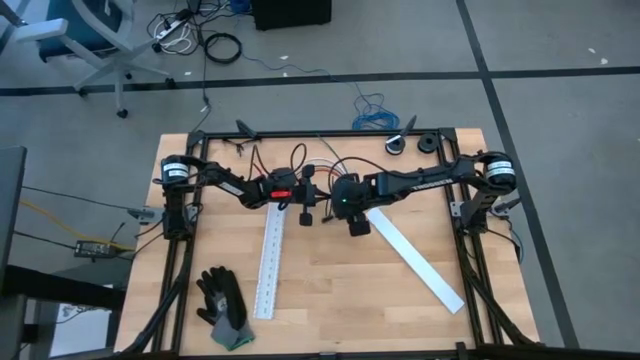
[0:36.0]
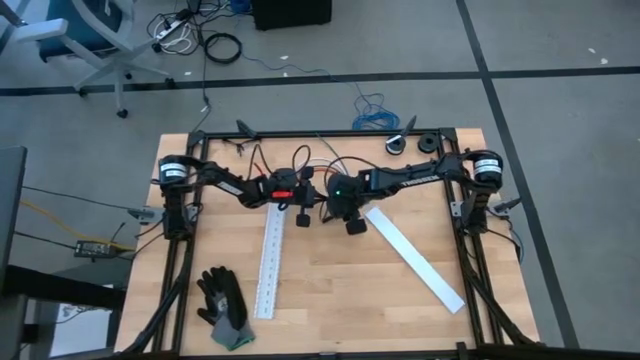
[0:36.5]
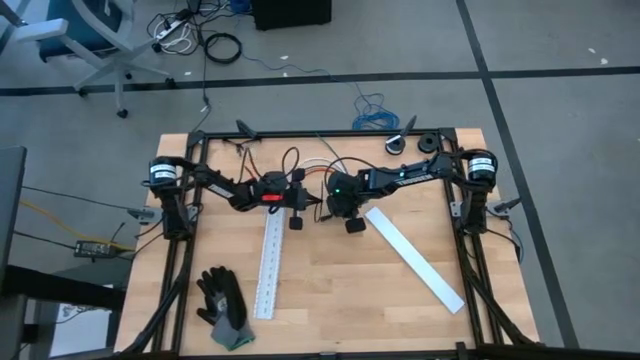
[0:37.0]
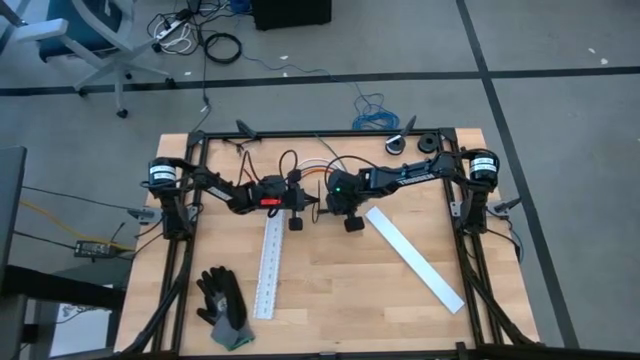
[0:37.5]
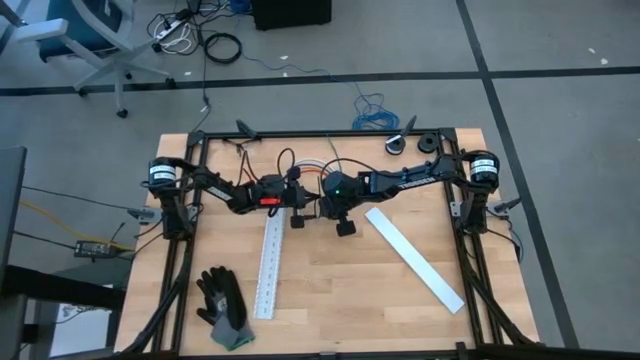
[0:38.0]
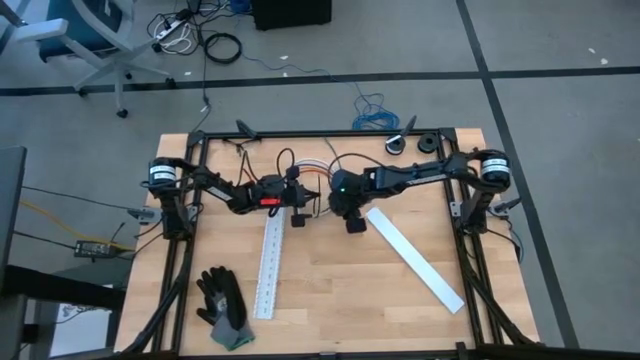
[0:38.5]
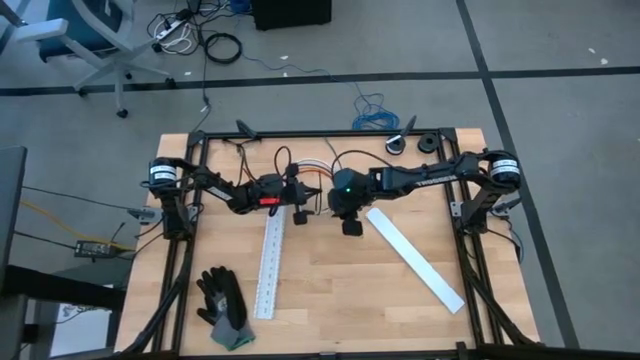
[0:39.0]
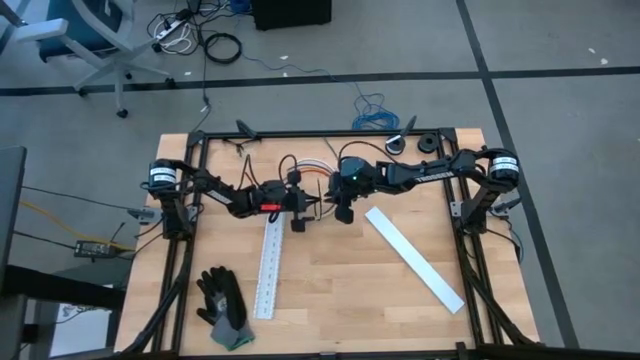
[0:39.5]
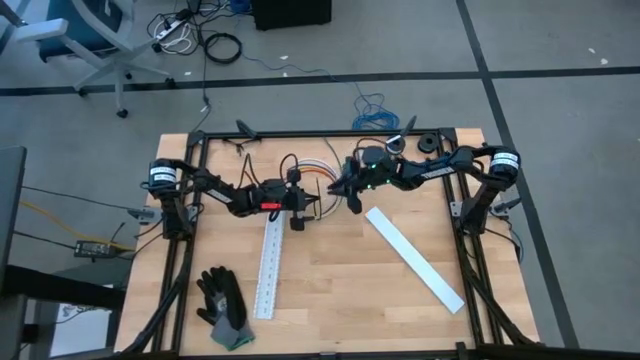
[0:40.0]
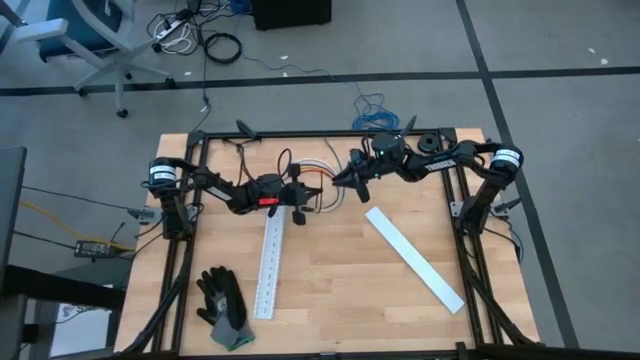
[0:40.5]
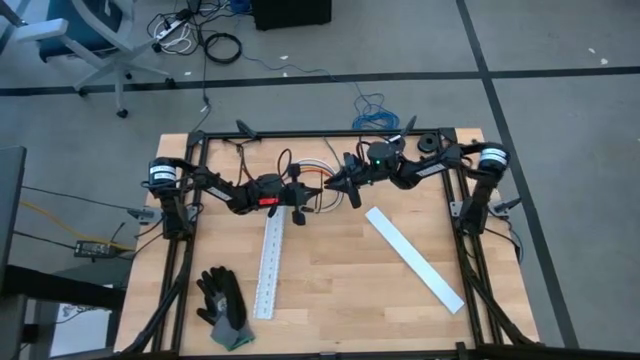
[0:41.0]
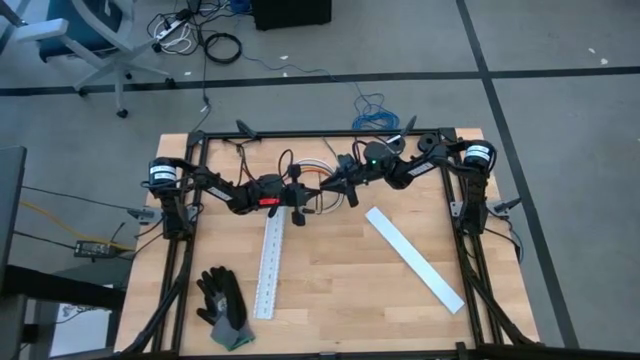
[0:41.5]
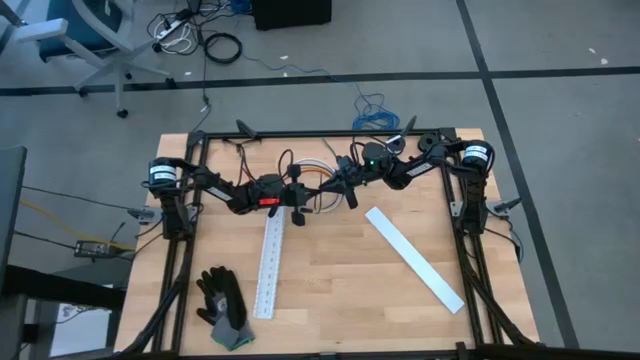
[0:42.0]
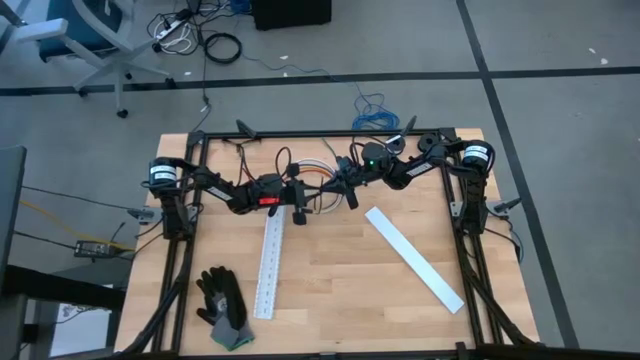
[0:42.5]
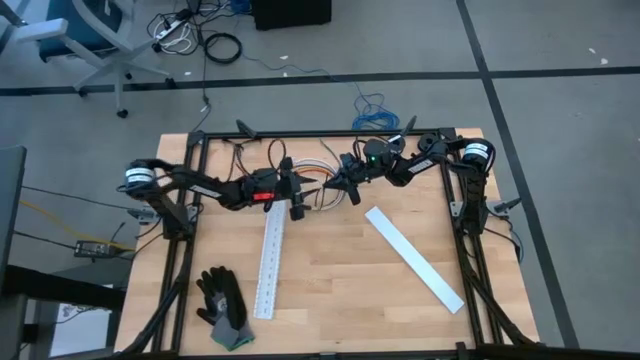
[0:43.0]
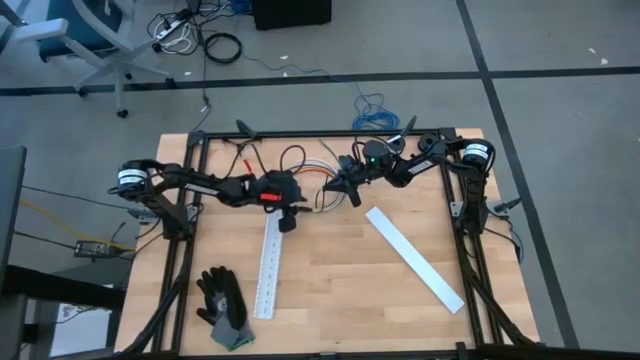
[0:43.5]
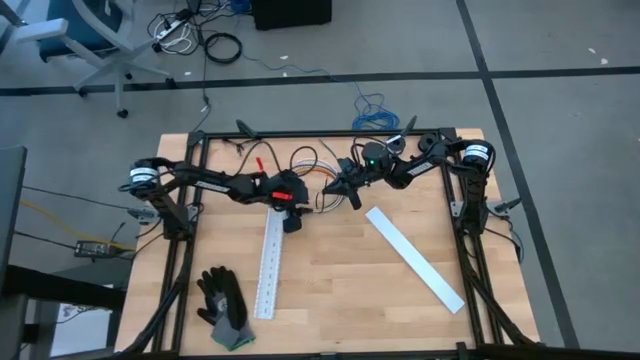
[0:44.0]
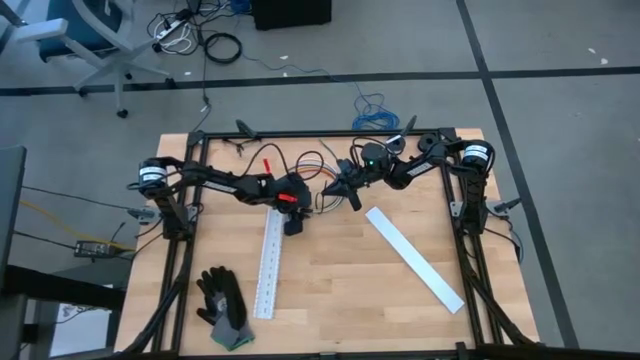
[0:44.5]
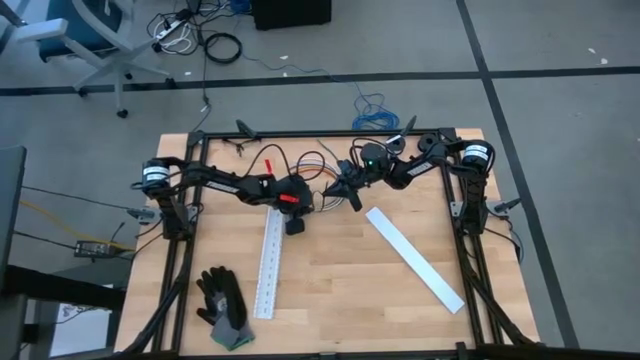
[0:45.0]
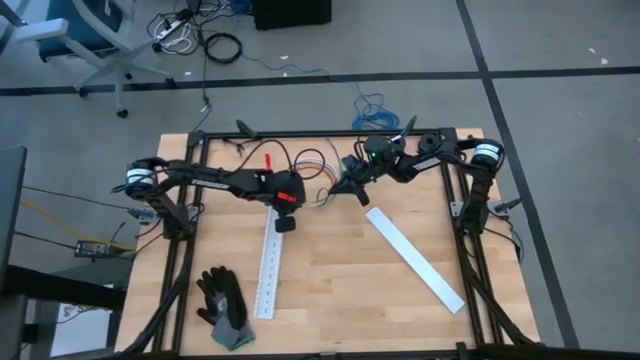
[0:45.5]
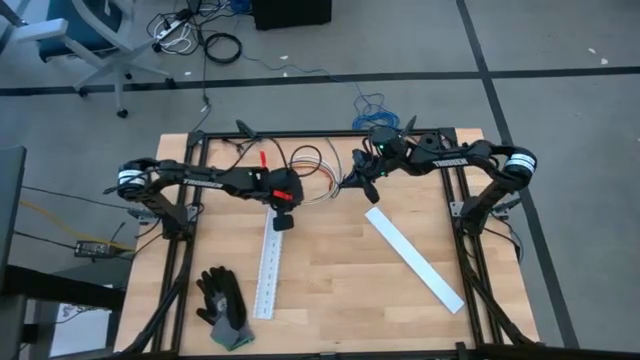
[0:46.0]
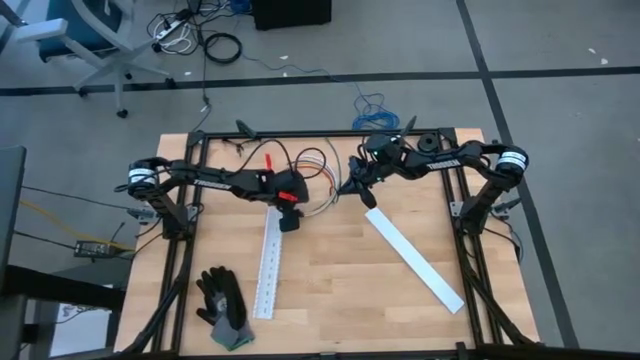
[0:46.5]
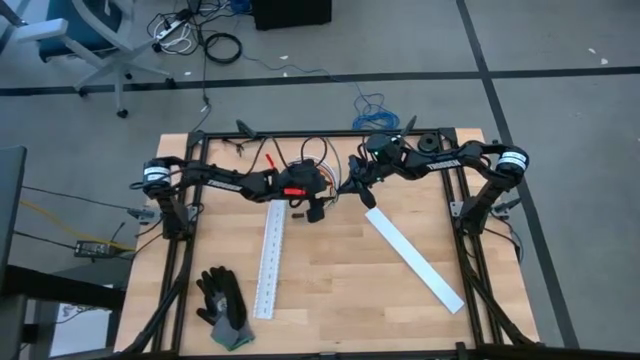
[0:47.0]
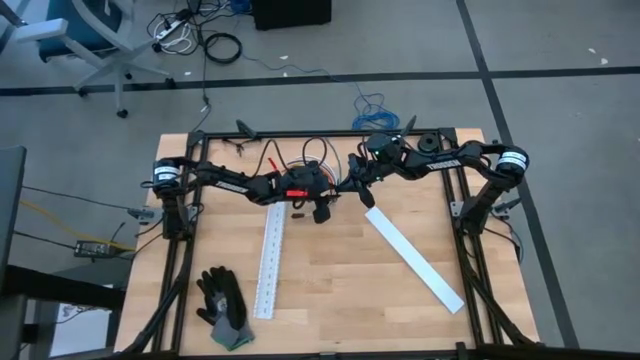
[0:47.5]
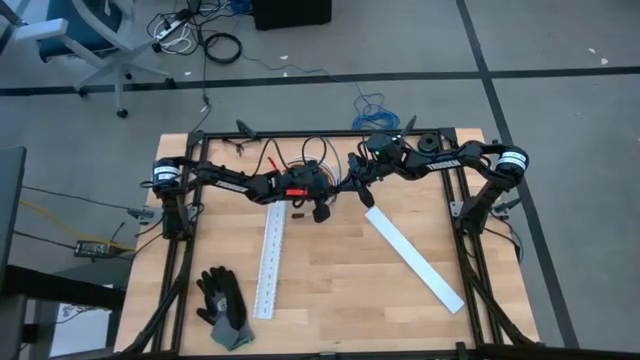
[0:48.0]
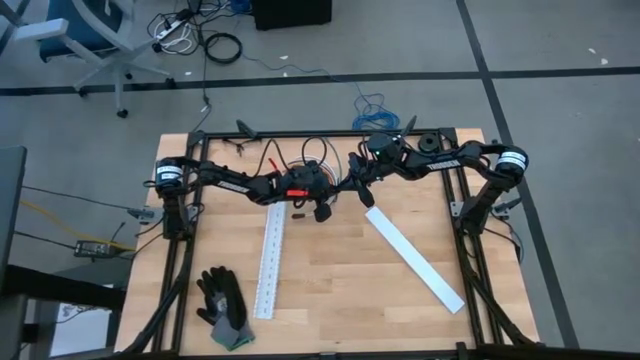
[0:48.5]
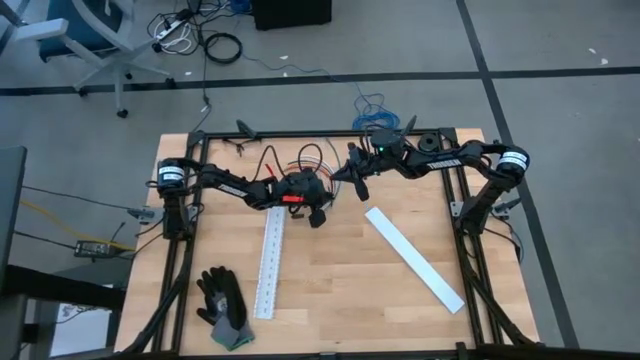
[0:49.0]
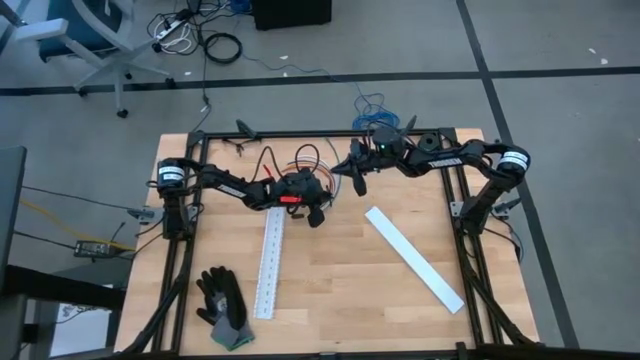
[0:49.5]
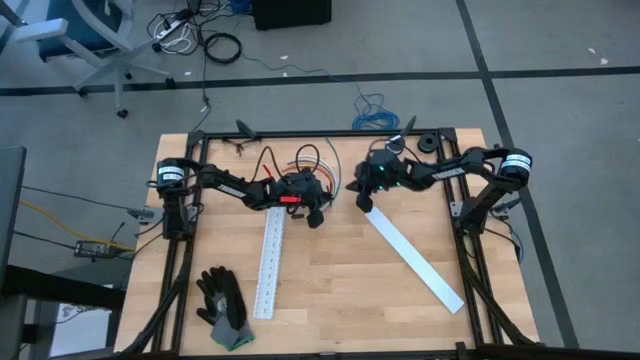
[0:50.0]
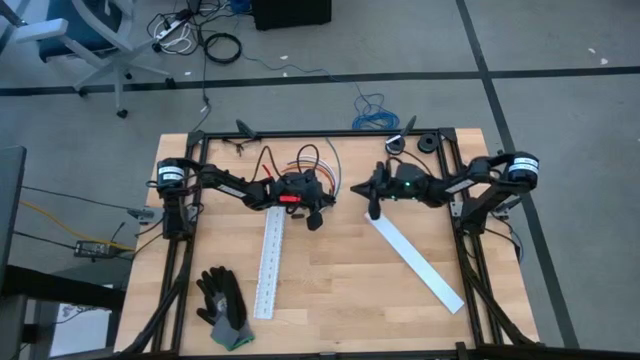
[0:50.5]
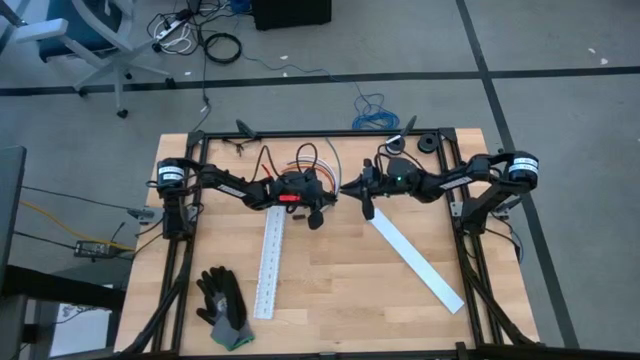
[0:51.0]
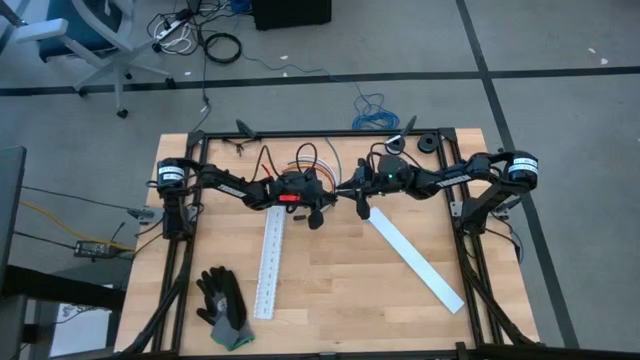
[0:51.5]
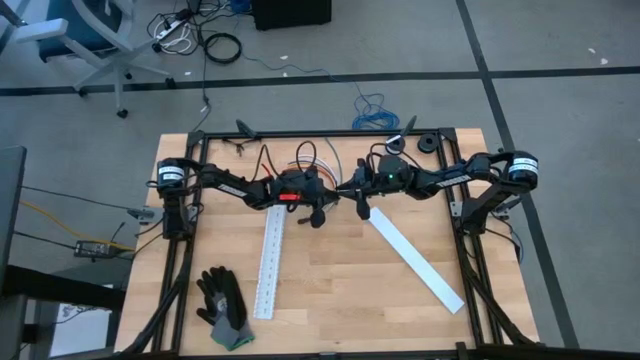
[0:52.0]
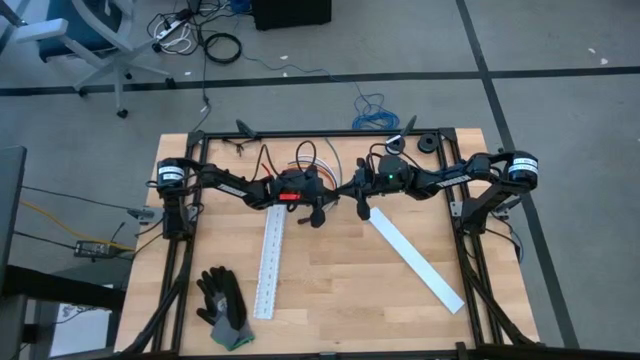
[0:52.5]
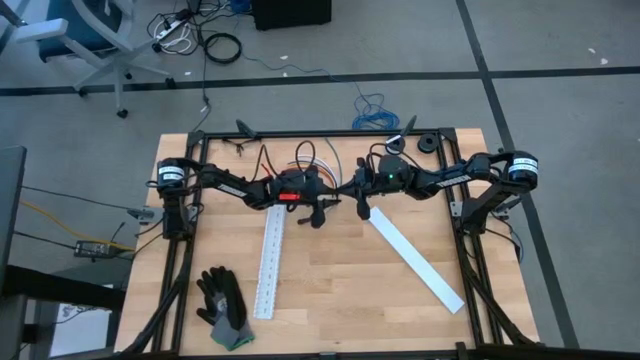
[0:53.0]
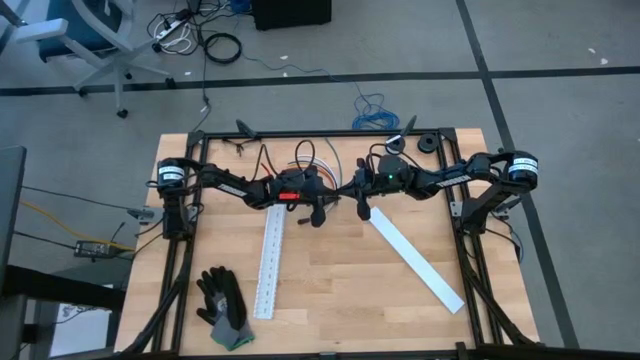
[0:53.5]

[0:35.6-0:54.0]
Task: Ziptie cables
Wrap the cable wires with the black zip tie

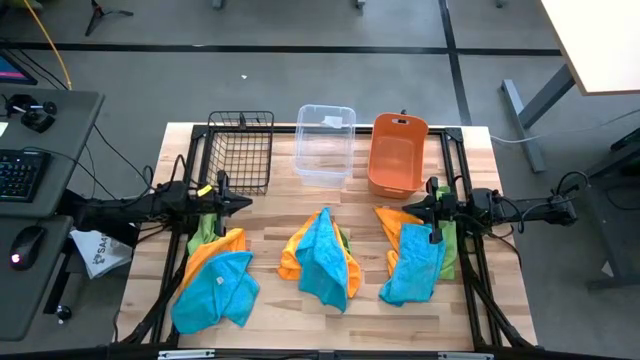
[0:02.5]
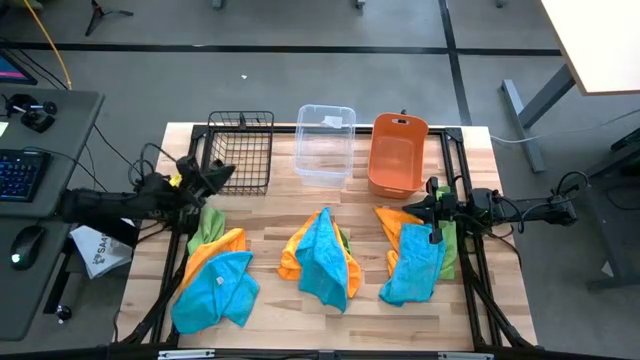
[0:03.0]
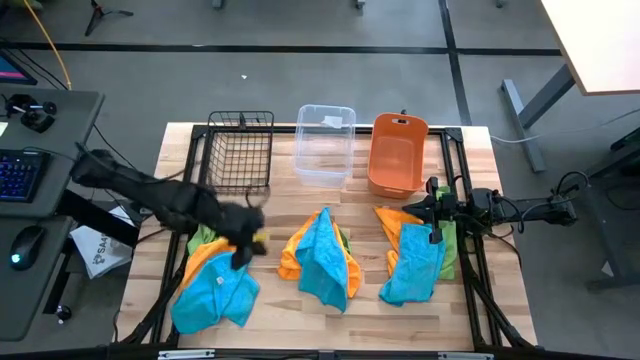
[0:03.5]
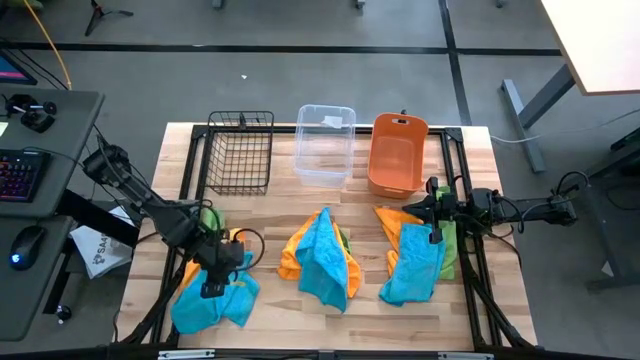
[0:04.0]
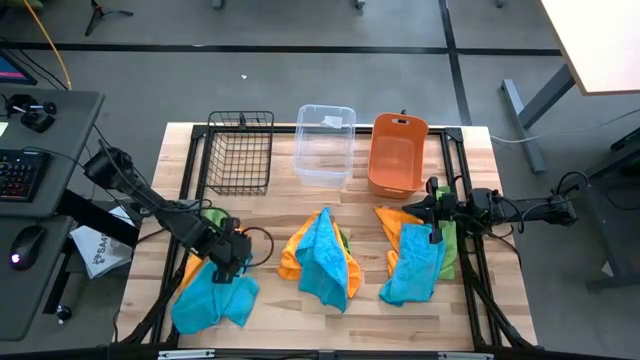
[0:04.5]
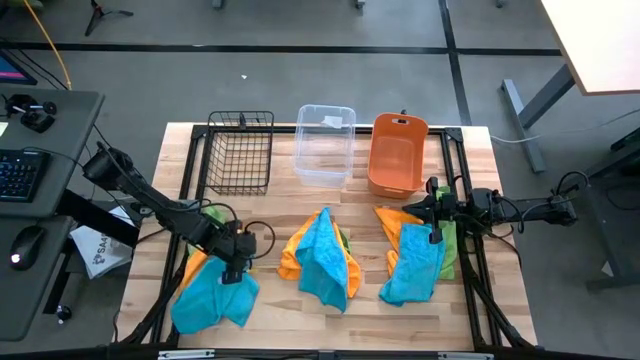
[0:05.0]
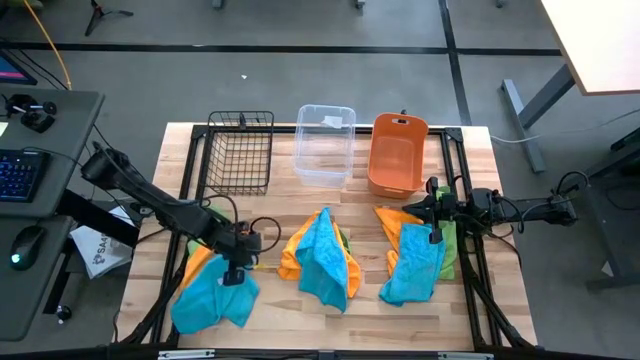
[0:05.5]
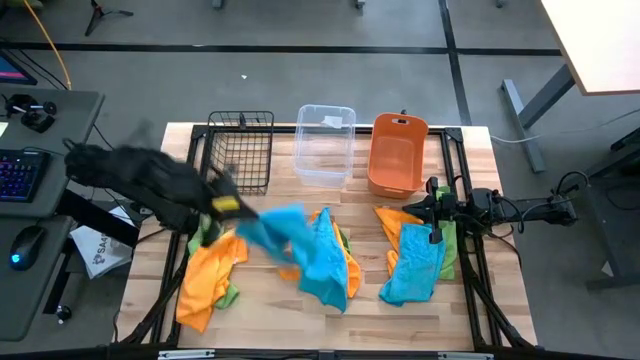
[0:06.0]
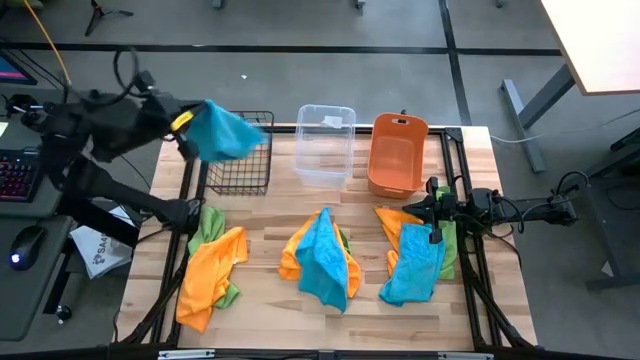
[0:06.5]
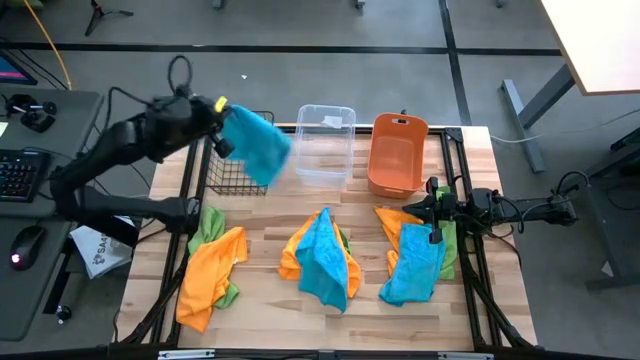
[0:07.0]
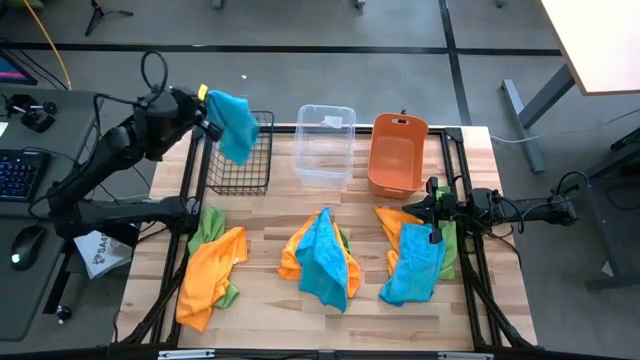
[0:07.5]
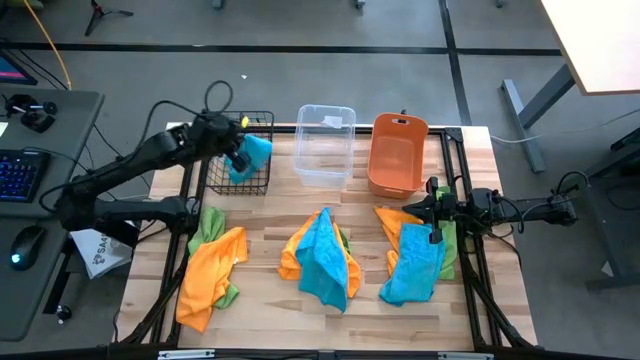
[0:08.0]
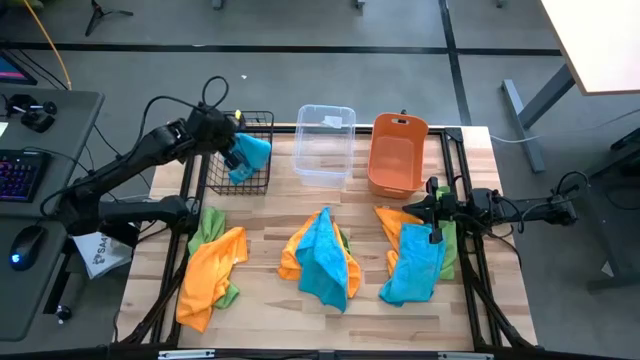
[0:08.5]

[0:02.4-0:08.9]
Task: Sort microfiber towel by color & place in baskets
Put the left blue towel into the wire basket
